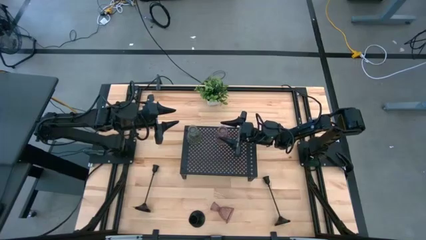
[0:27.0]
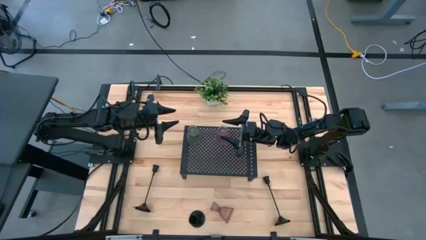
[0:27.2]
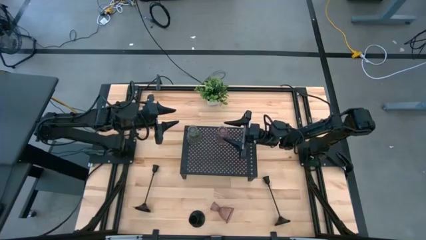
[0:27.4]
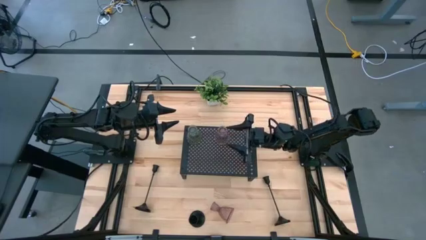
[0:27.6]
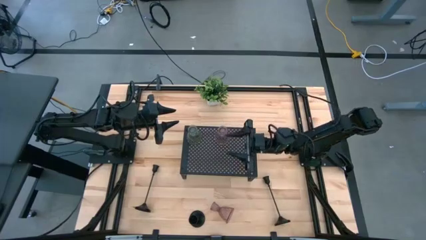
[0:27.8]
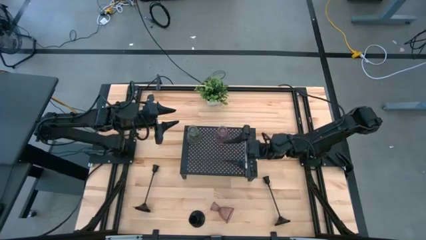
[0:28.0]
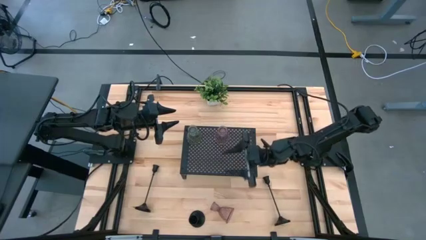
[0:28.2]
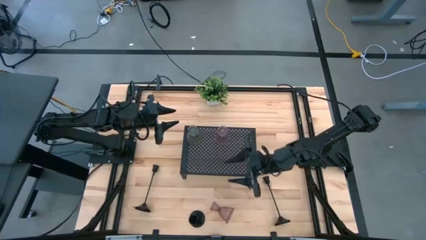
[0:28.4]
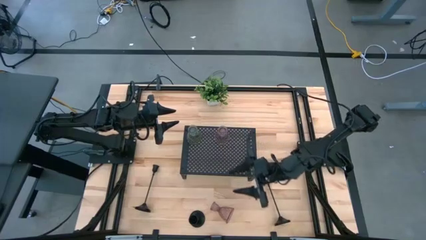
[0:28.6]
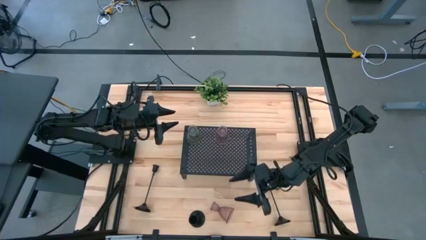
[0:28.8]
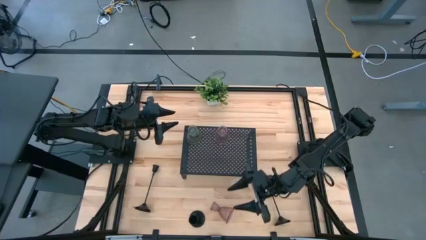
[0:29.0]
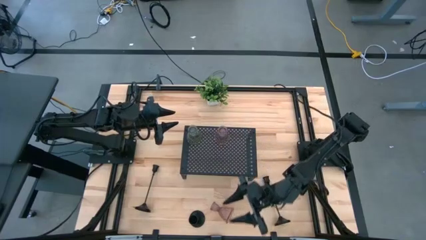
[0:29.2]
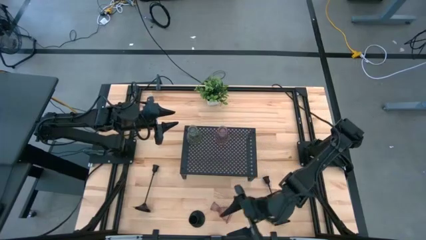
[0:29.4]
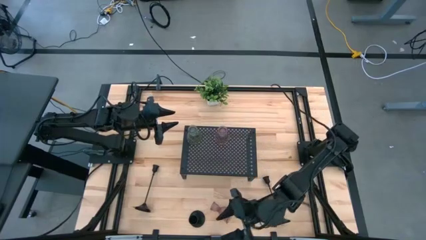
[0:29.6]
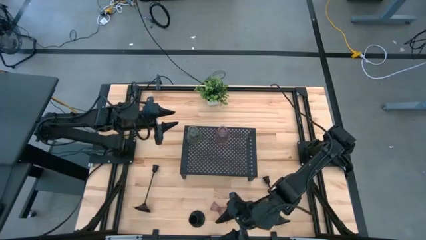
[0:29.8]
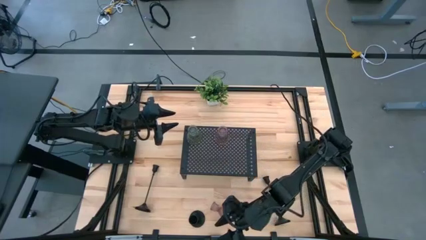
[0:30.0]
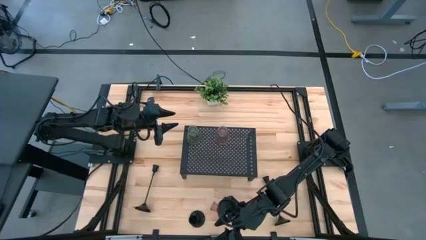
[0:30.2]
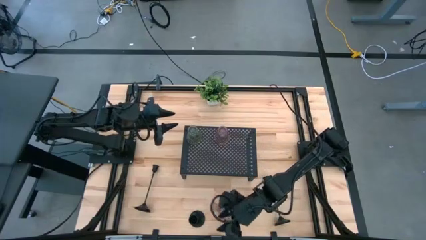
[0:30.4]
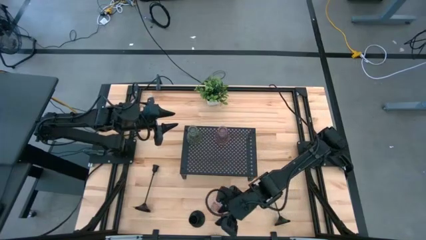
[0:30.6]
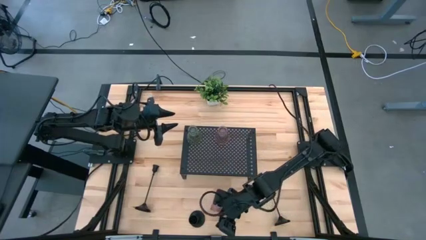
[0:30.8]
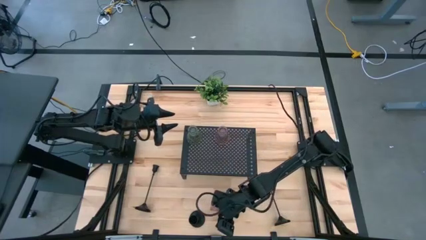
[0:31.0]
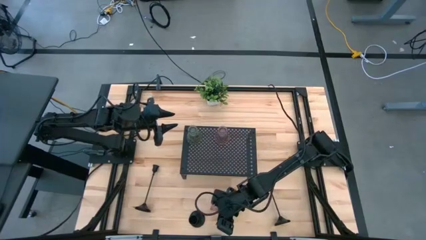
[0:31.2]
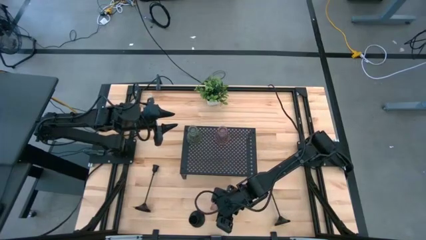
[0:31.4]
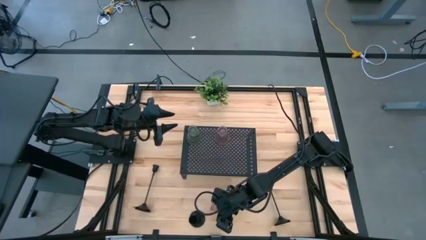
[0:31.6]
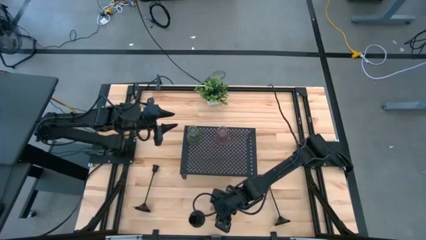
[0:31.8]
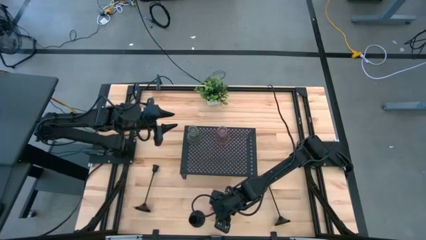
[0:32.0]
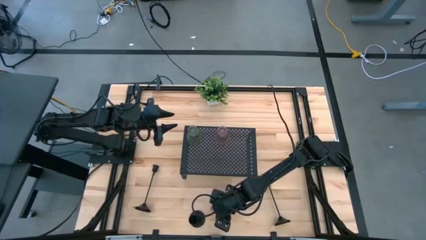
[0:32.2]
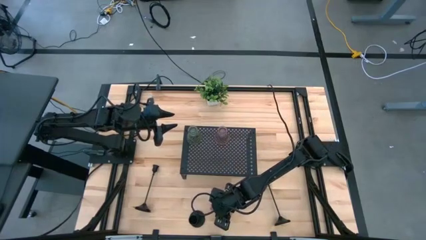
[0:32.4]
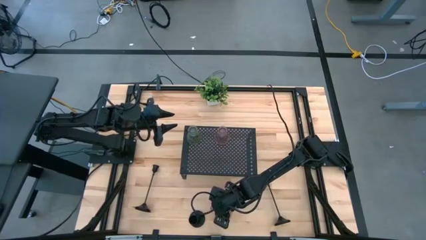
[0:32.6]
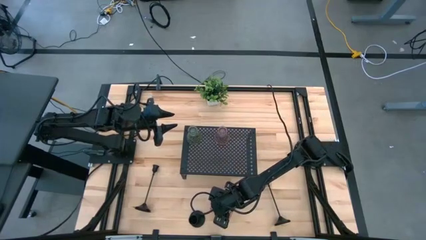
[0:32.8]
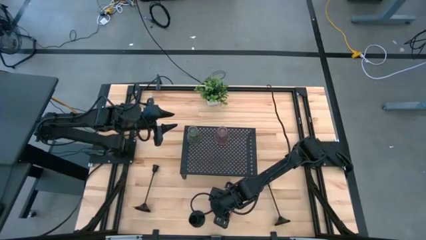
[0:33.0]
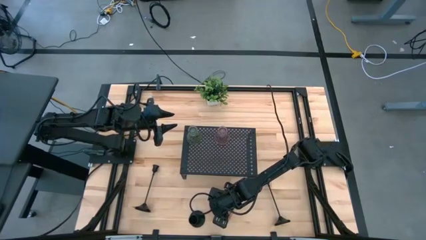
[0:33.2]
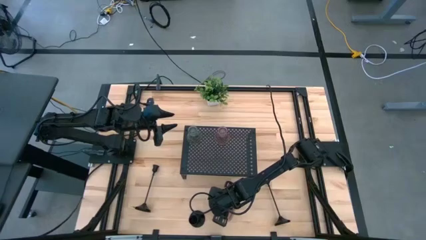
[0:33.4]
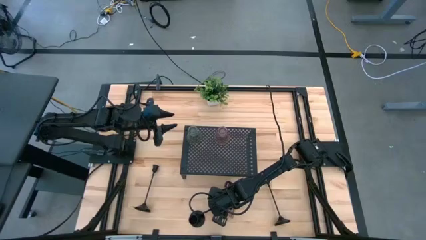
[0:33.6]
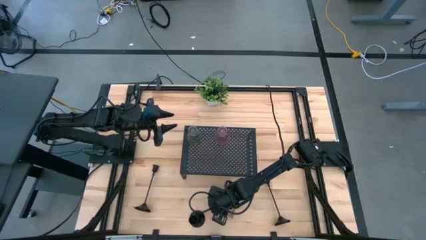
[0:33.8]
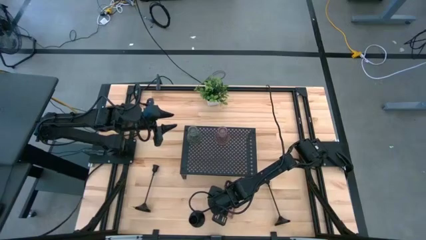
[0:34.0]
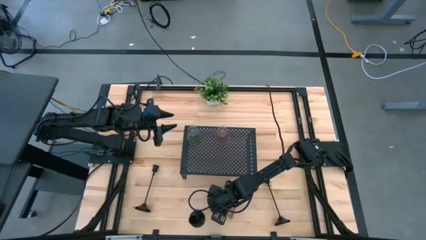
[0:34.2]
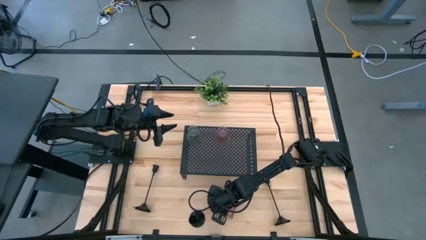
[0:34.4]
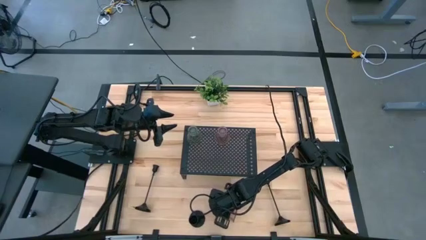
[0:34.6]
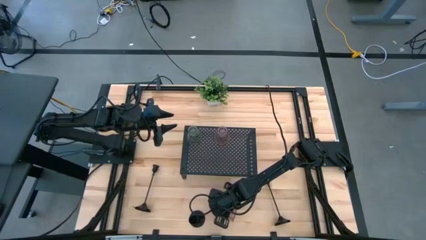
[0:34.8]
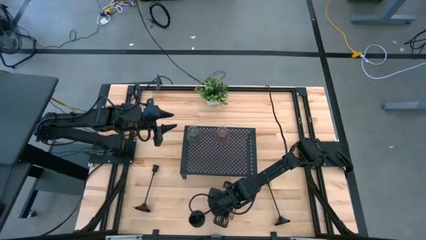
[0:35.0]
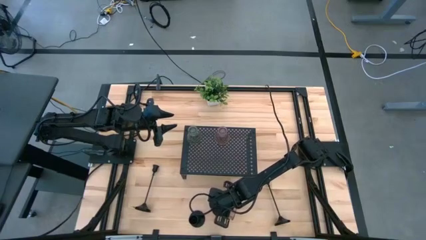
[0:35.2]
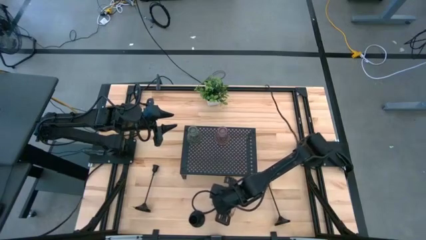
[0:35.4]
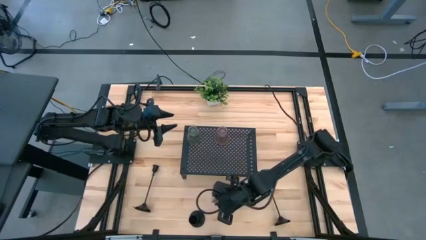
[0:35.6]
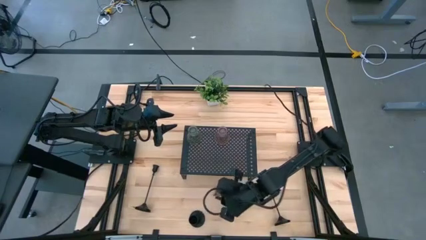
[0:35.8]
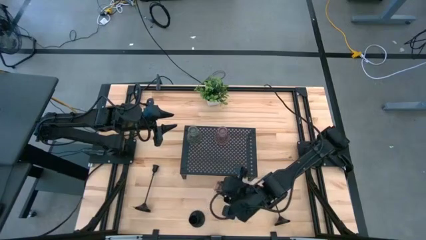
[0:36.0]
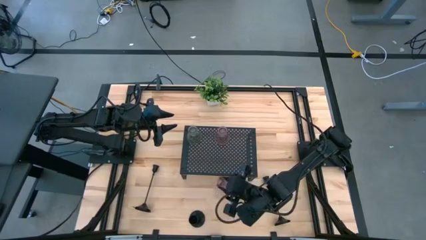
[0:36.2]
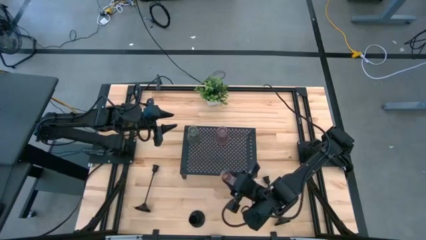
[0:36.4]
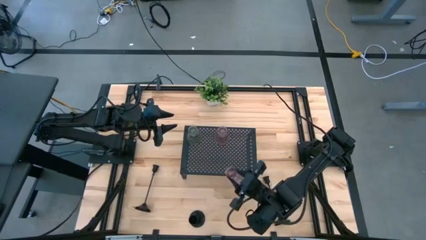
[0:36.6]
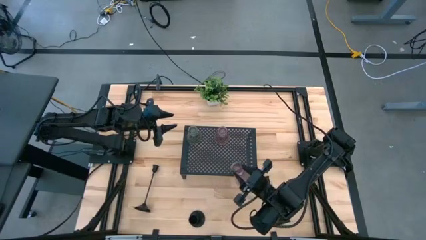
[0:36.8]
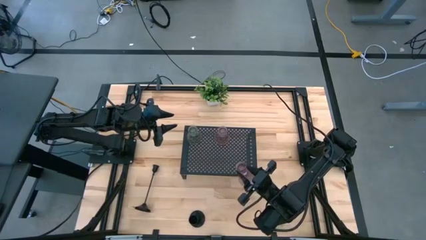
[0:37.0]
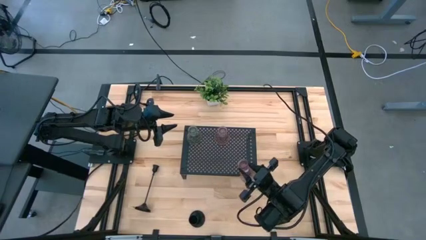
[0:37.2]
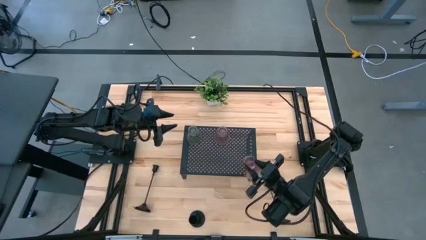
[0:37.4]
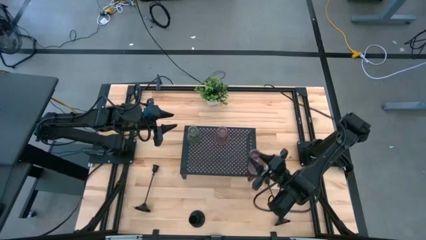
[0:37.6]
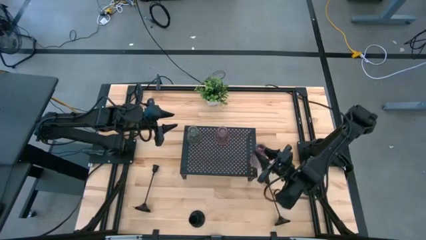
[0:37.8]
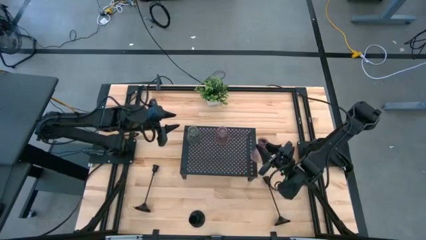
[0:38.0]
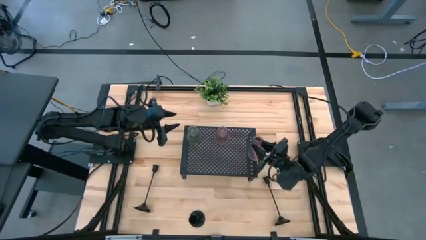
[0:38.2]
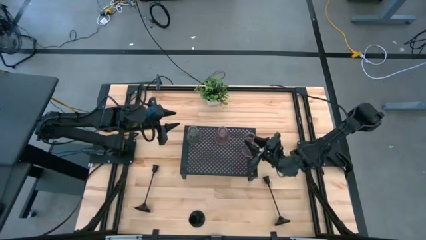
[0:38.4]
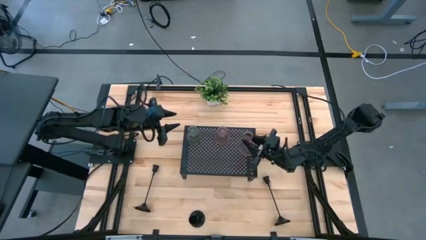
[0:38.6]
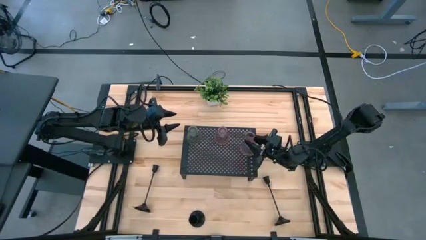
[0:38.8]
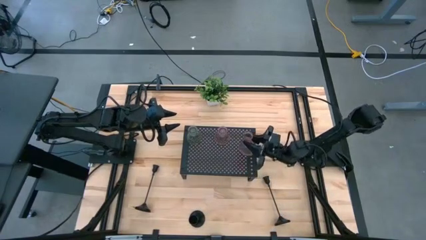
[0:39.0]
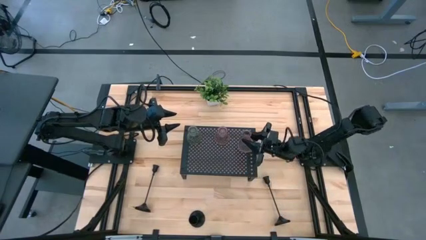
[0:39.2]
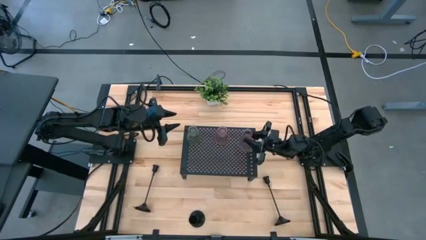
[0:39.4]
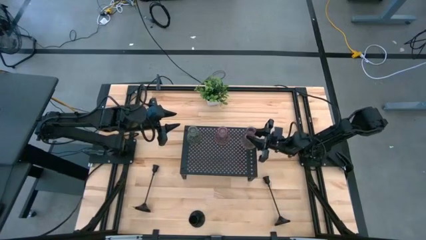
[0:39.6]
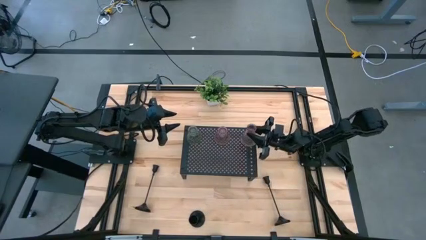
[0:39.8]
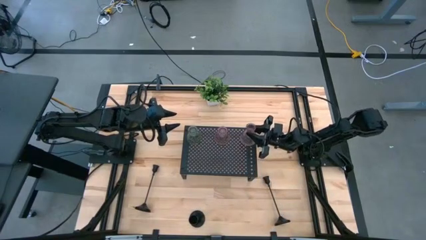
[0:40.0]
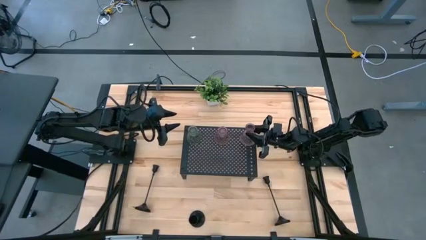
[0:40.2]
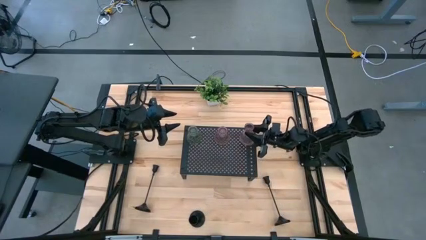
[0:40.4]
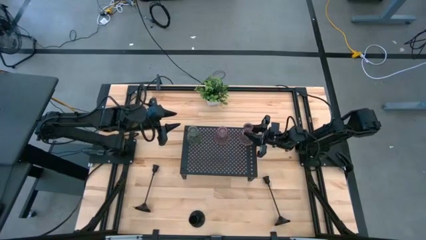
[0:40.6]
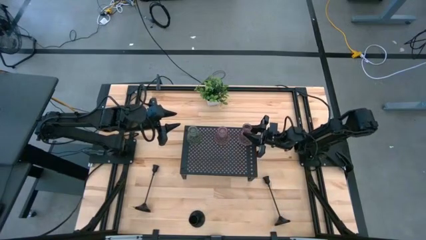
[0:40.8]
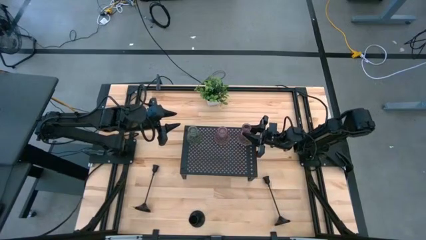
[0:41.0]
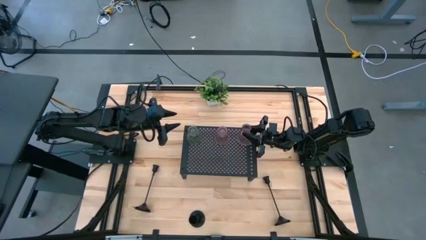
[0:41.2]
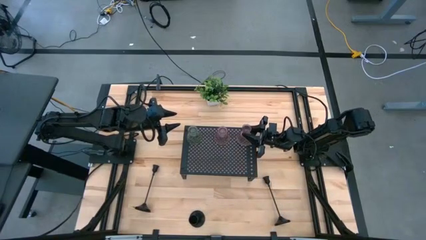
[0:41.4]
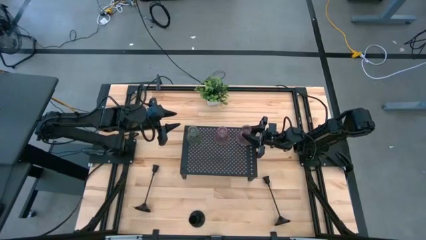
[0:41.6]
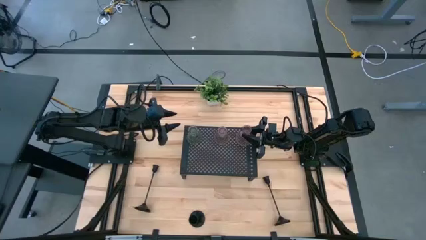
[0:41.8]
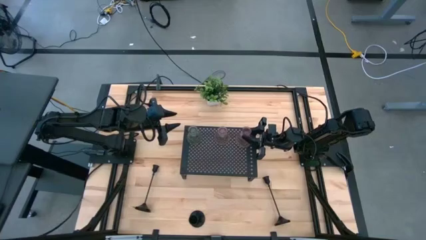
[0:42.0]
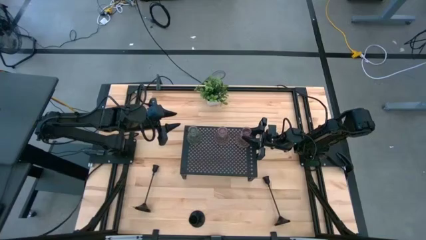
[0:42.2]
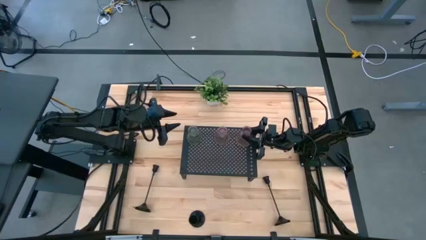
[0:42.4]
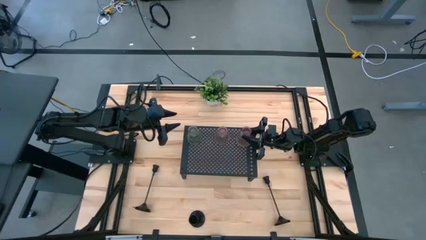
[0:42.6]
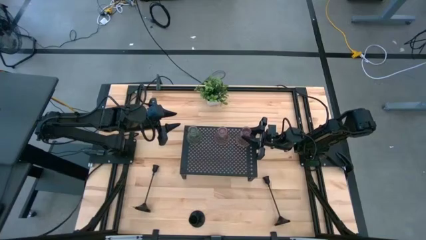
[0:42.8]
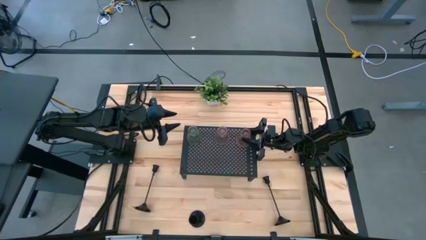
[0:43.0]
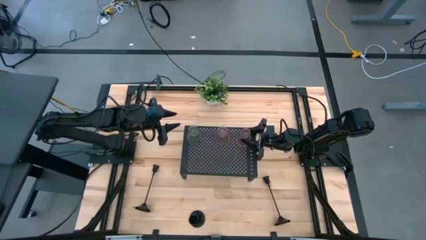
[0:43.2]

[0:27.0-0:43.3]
Task: Pick & Place candle stick holders
Put the pink glass candle holder on the shelf aligned with the other glass candle holders
